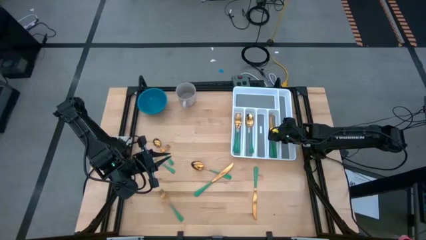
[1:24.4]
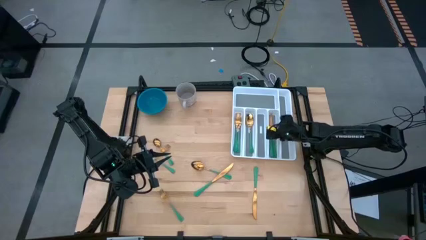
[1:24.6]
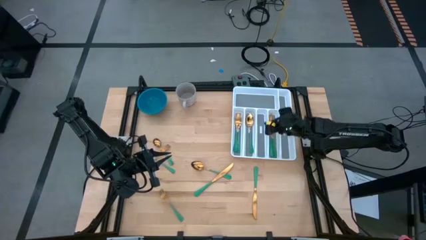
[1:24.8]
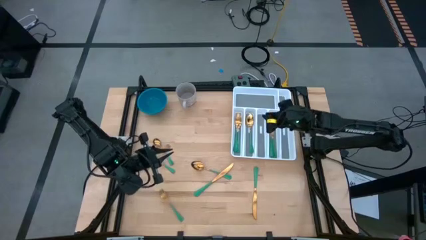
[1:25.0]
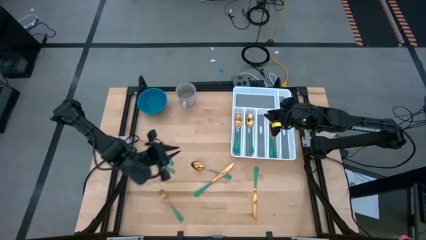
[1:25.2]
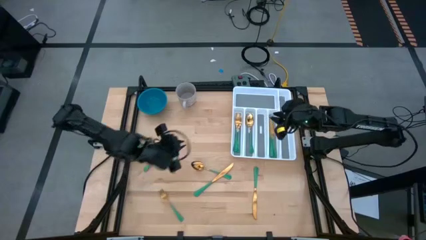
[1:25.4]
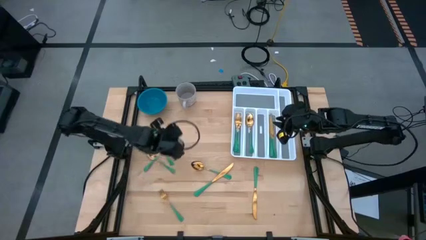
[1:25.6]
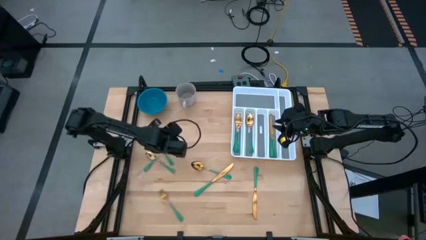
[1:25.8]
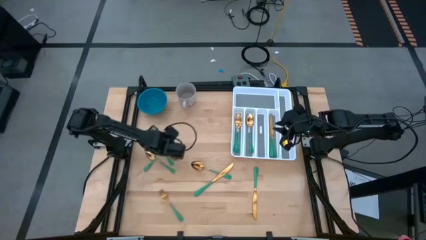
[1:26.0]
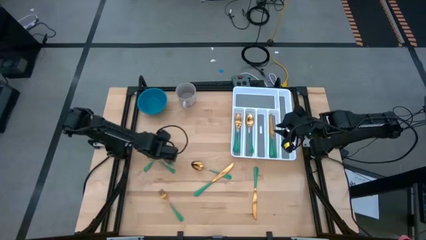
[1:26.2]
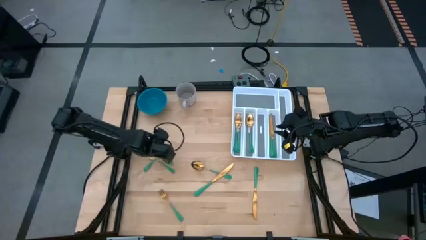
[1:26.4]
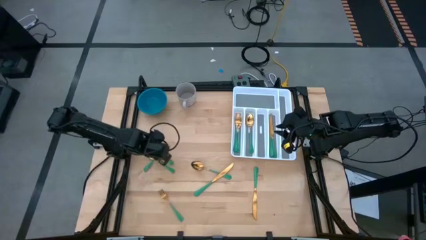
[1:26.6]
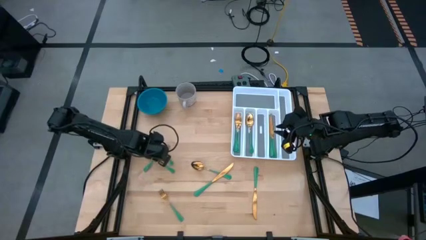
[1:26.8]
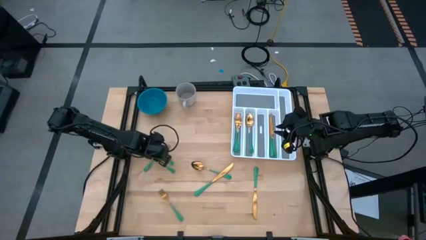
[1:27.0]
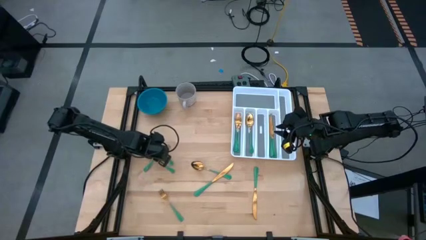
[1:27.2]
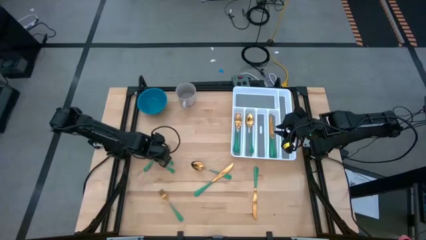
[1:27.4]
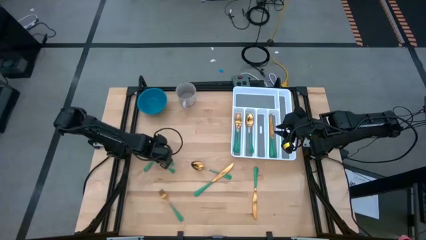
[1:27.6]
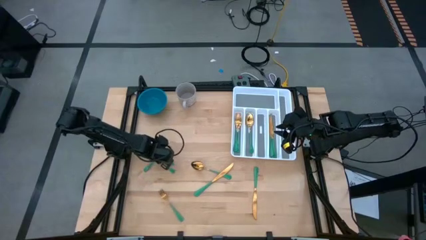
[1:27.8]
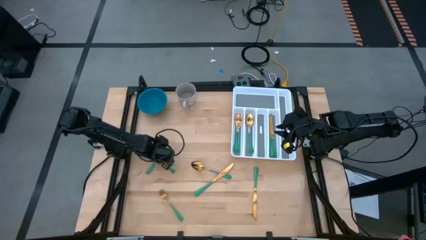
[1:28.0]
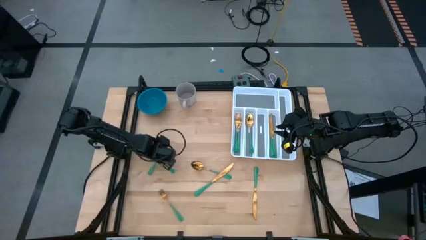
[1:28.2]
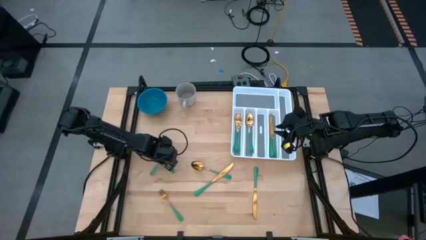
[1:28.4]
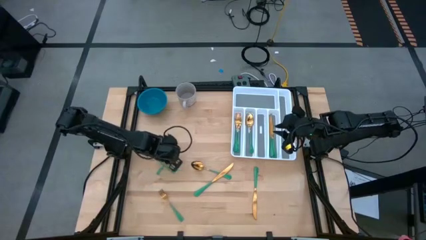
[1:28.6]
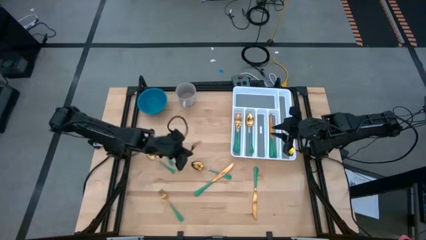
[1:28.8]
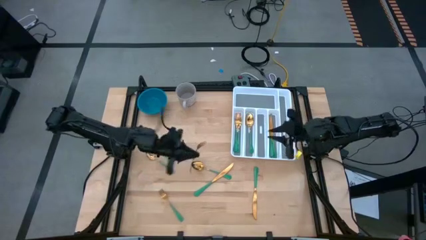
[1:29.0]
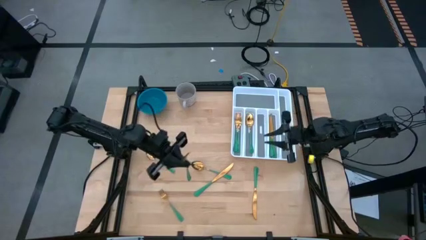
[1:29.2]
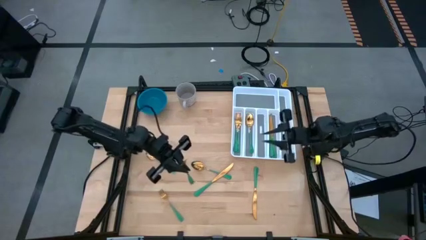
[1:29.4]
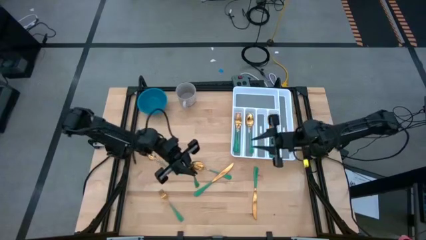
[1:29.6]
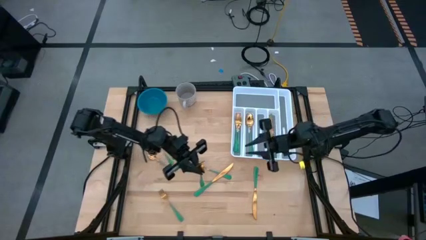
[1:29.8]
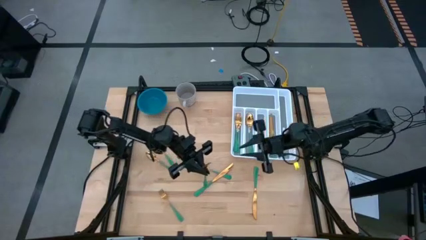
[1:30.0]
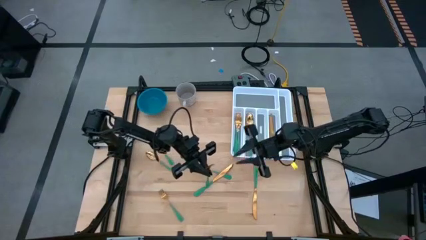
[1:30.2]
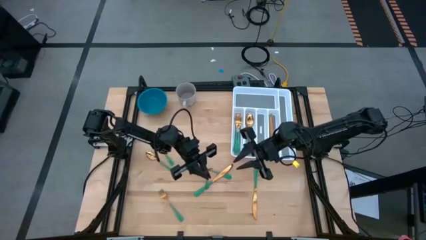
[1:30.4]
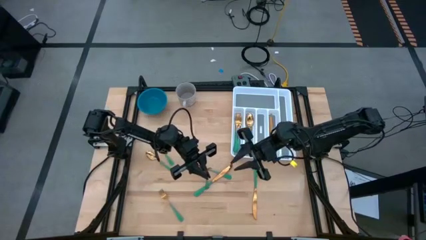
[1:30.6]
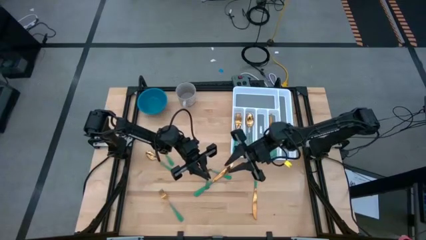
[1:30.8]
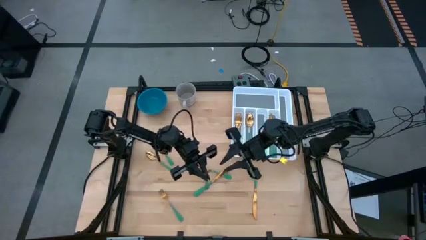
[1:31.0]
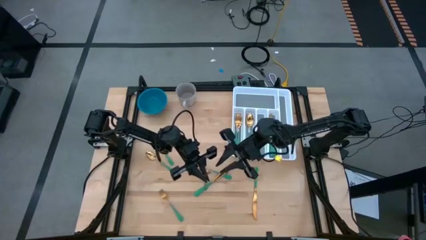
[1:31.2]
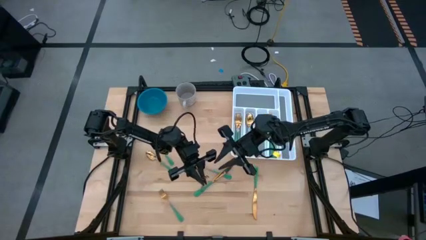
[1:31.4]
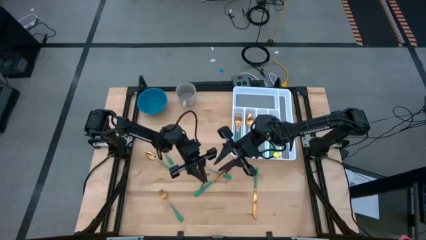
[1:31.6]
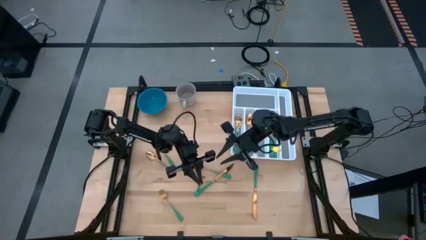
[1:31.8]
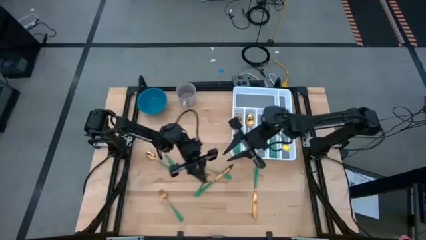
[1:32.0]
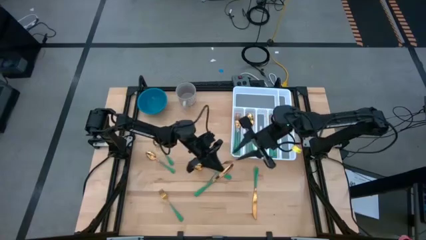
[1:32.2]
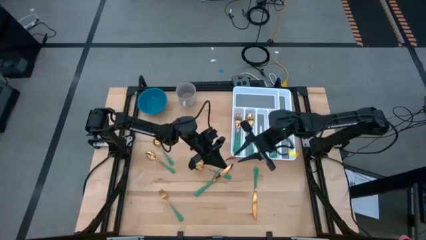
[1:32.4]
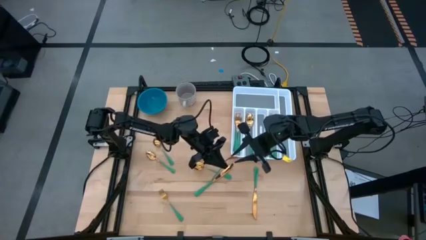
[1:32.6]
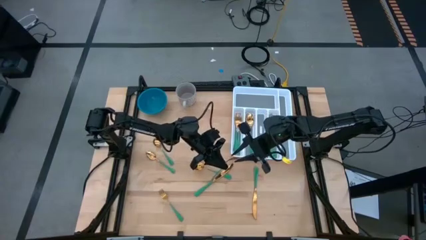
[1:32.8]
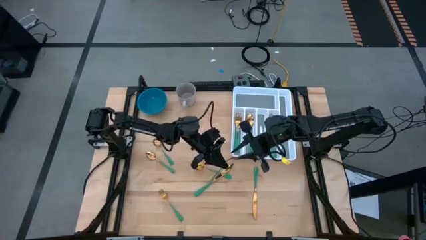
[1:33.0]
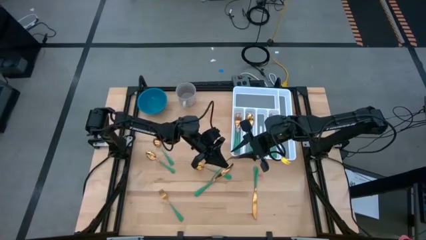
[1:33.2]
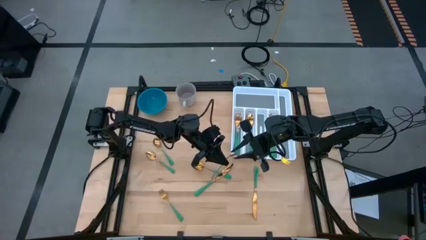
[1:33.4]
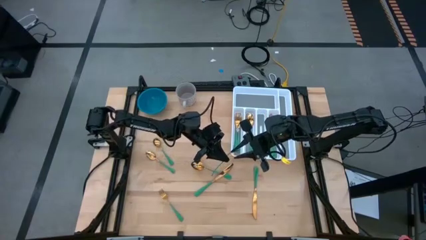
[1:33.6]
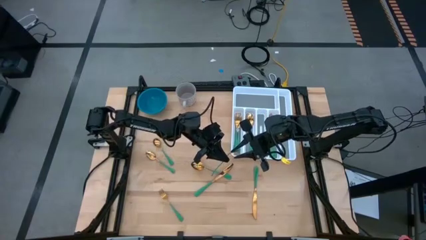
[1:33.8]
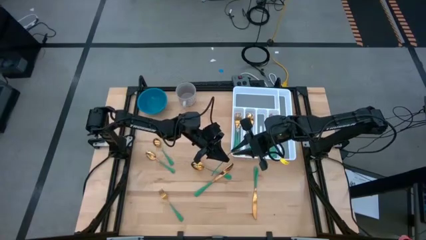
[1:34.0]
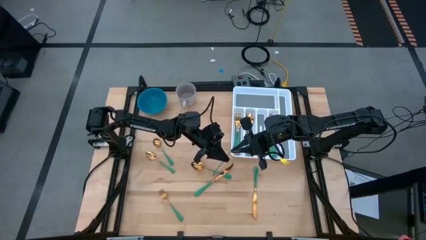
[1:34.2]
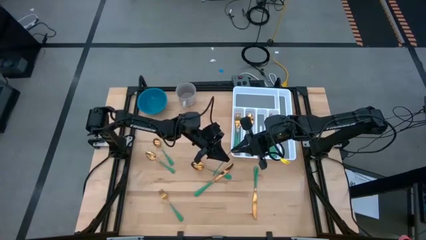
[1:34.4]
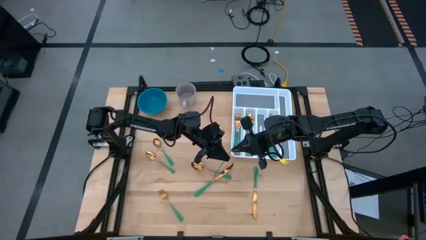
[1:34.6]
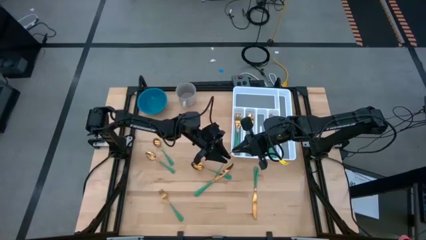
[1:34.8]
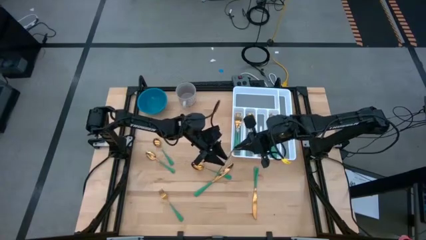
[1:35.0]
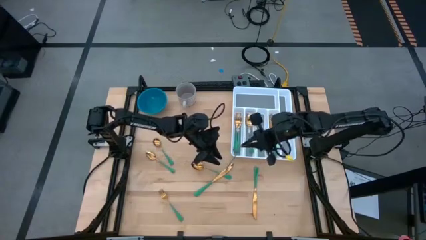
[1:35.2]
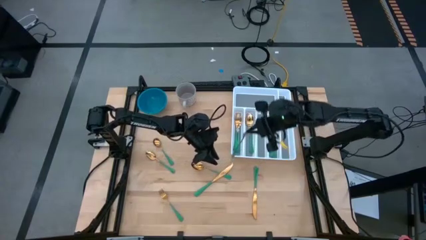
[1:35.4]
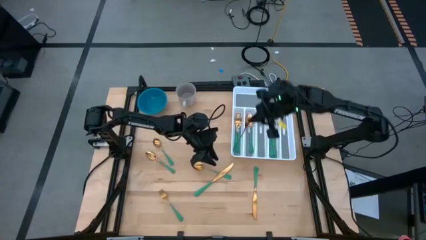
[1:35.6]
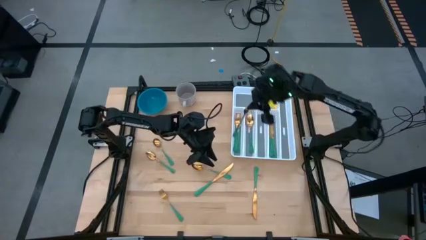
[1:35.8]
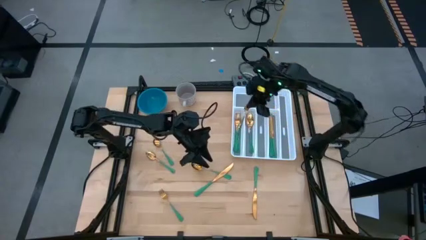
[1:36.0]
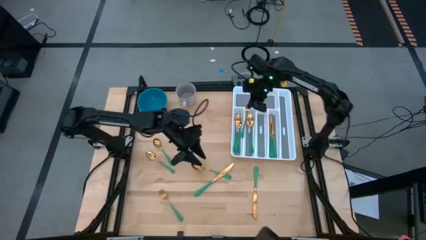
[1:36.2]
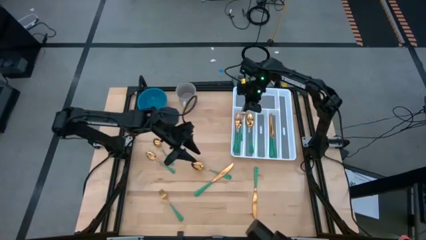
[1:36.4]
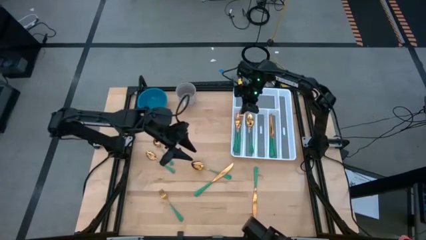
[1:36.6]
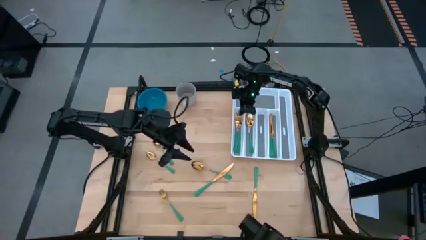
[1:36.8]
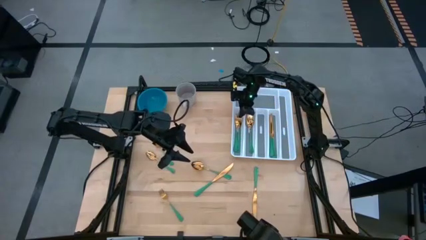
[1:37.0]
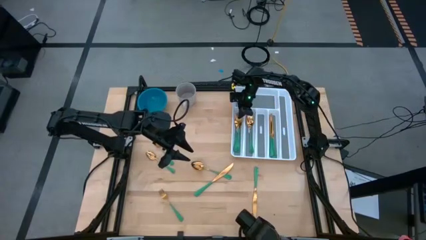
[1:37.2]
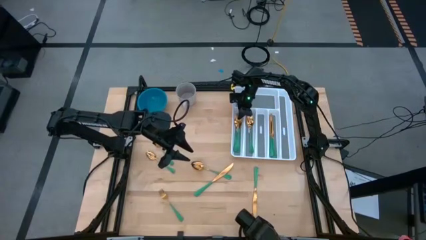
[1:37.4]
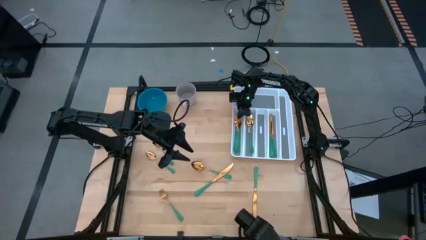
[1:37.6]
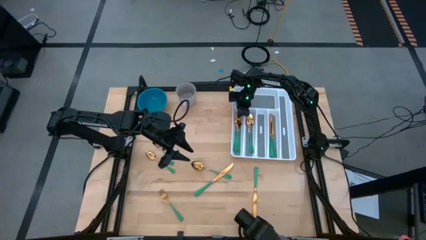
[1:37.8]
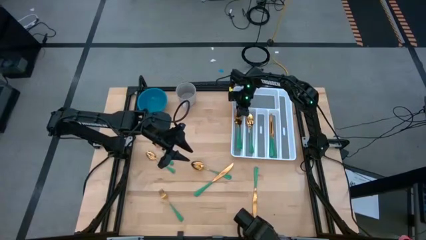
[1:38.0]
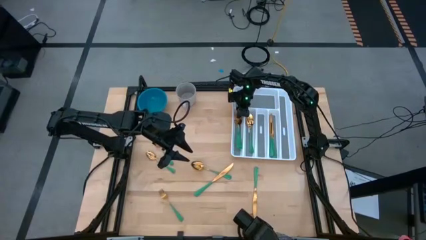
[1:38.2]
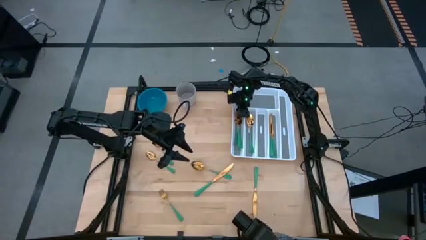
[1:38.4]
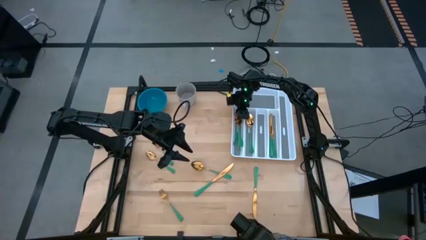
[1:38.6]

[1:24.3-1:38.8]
Task: Sort silverware
Put the green fork into the white silverware organizer

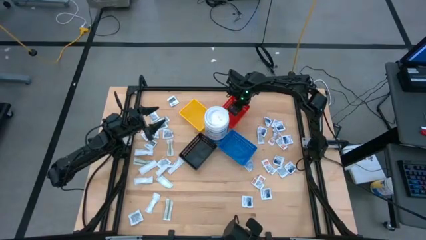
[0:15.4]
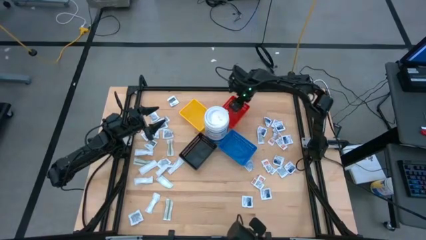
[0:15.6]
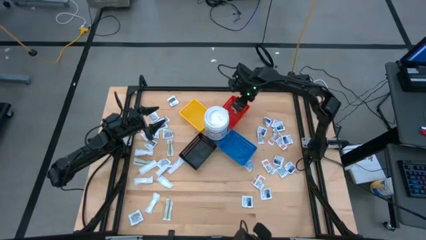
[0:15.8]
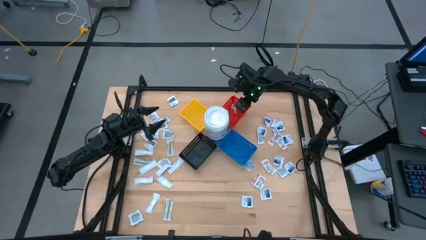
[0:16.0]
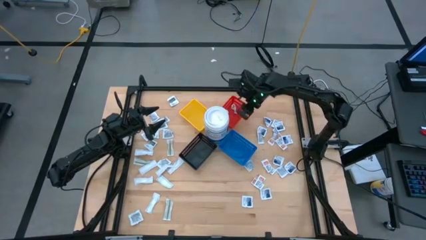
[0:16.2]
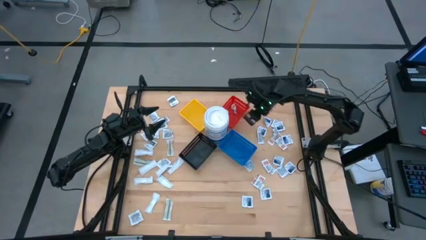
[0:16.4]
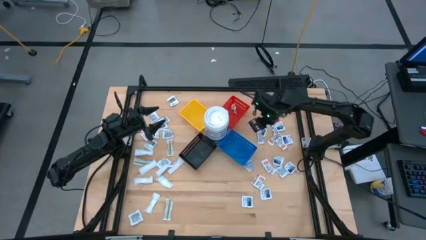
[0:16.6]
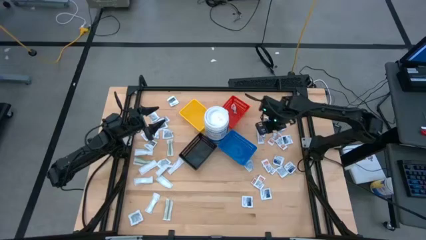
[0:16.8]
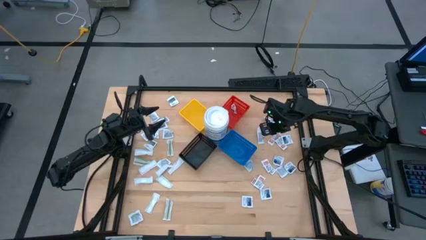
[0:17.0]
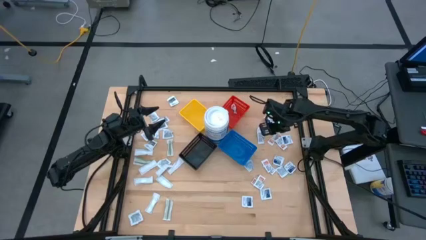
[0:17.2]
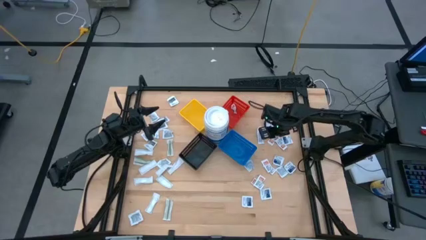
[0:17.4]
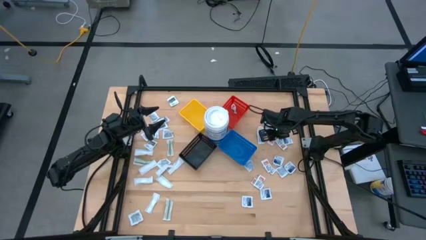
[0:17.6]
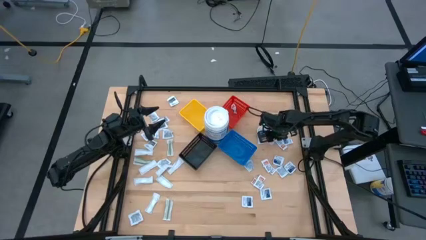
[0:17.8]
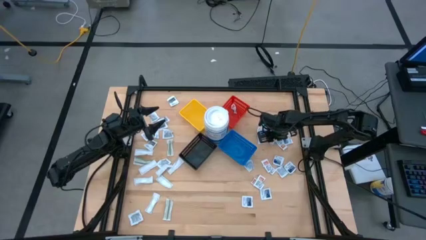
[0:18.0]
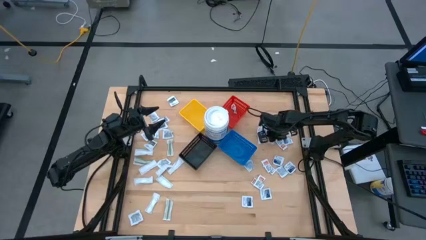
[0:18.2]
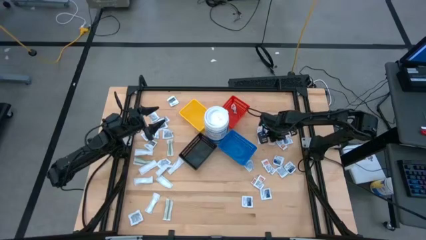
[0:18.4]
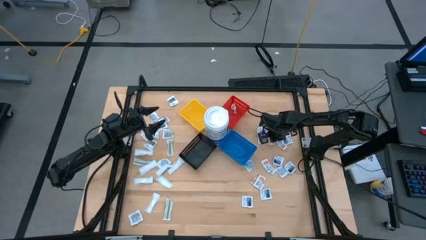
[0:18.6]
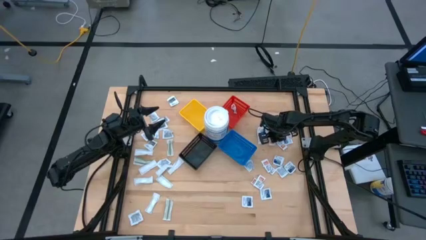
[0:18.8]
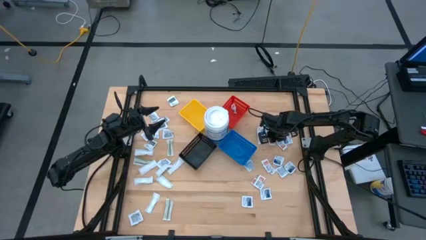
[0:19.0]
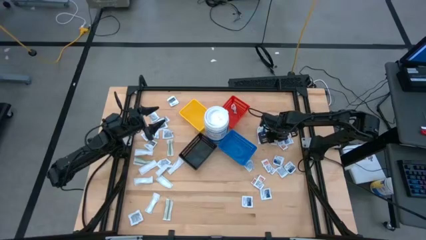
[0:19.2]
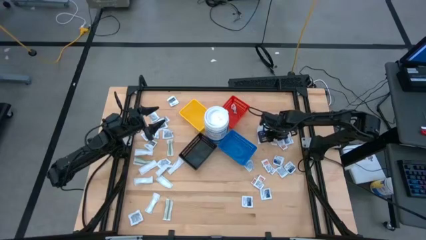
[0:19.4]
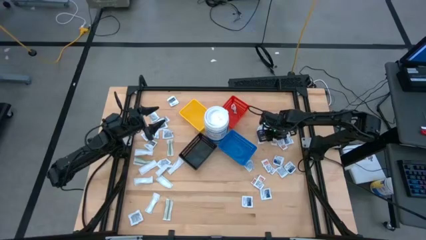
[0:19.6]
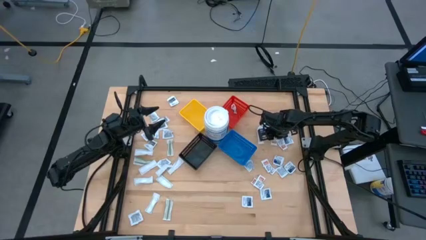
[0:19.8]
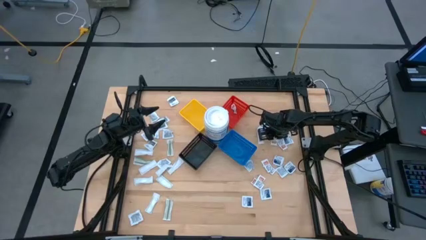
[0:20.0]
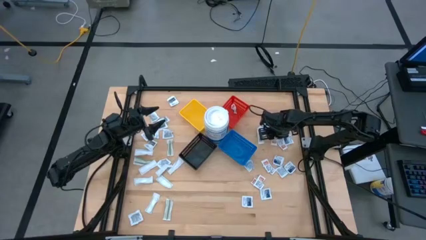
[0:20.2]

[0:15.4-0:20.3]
Task: Pick & Place First Aid Supplies
Put the ointment pack into the red bin
